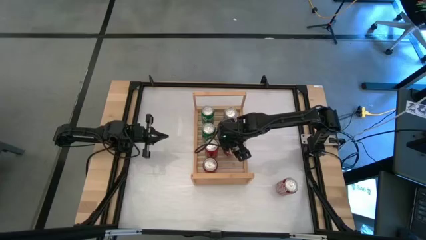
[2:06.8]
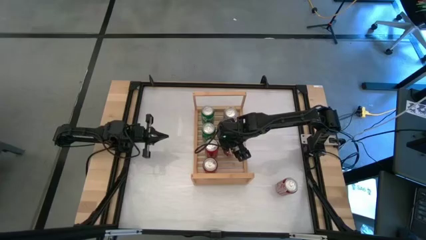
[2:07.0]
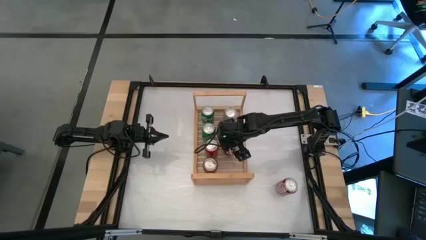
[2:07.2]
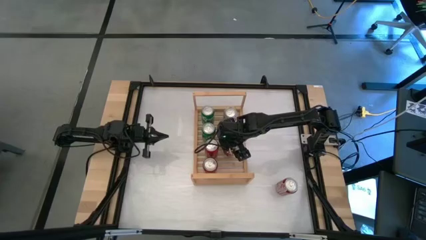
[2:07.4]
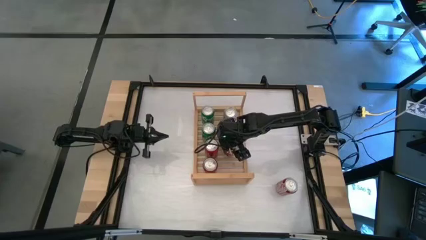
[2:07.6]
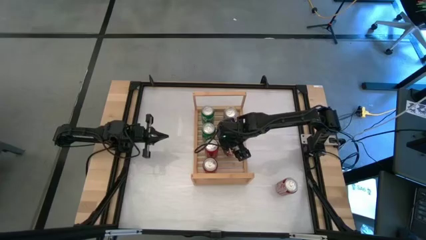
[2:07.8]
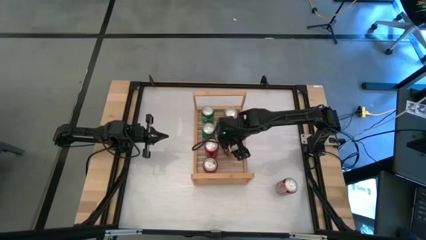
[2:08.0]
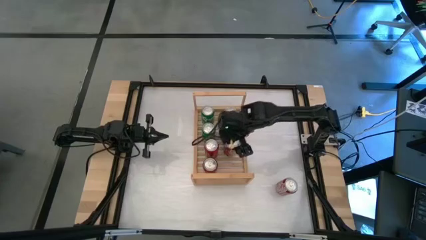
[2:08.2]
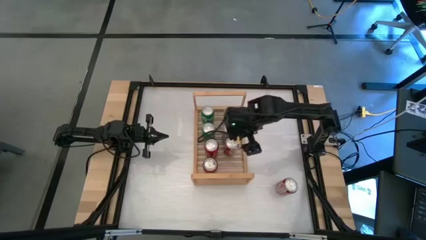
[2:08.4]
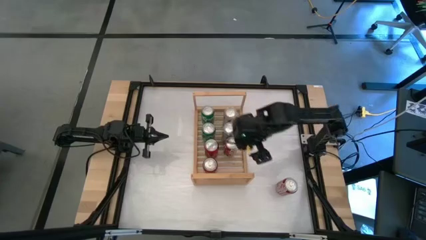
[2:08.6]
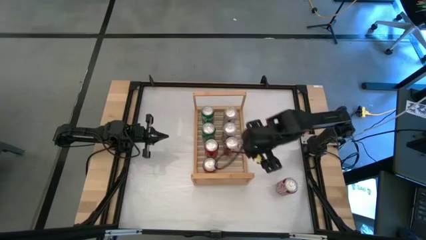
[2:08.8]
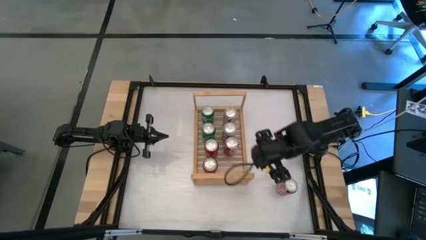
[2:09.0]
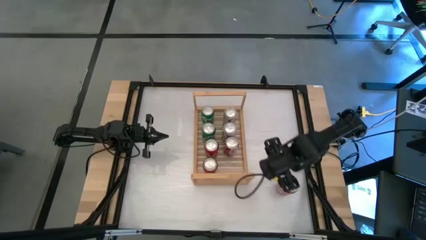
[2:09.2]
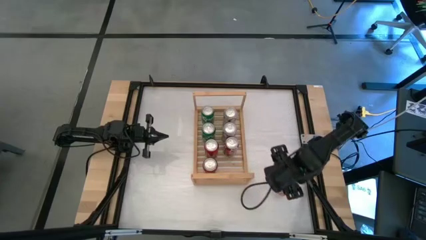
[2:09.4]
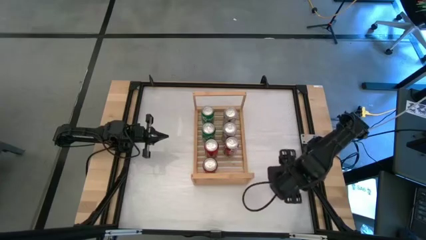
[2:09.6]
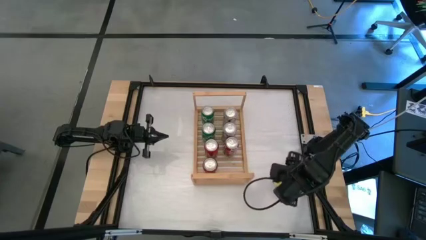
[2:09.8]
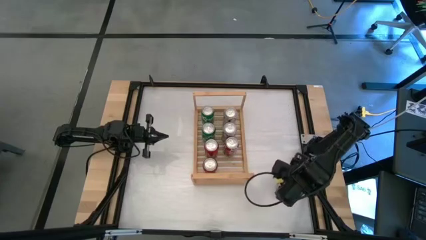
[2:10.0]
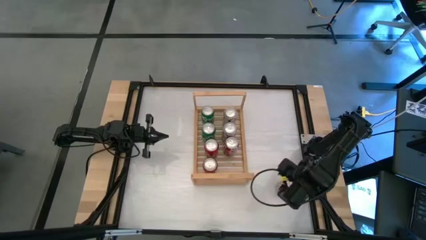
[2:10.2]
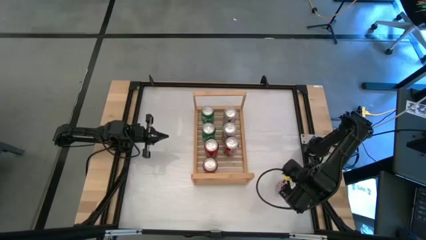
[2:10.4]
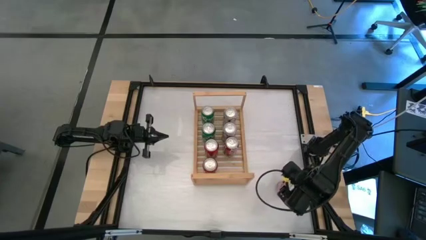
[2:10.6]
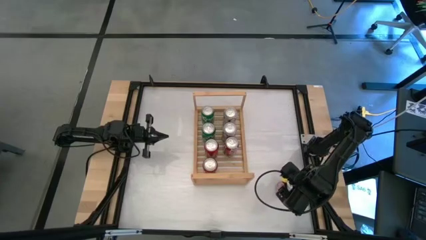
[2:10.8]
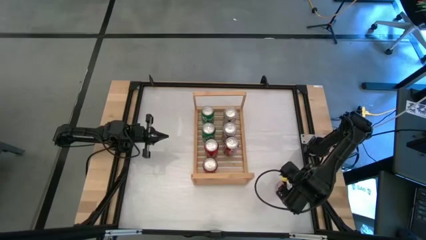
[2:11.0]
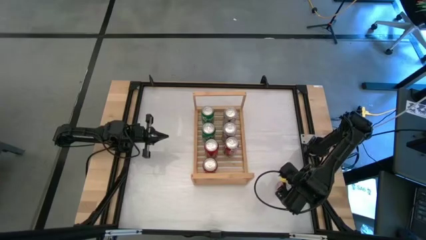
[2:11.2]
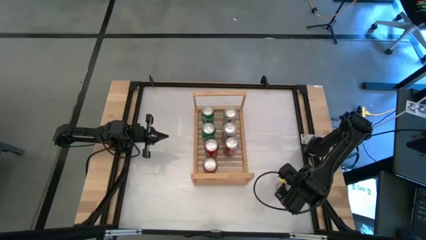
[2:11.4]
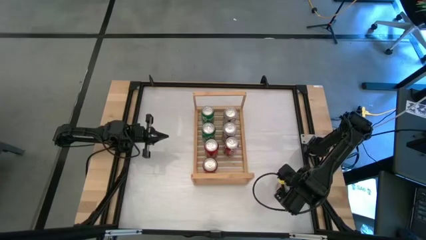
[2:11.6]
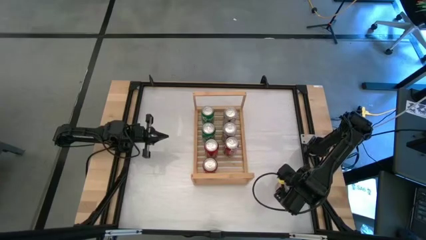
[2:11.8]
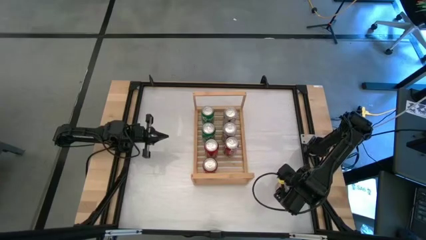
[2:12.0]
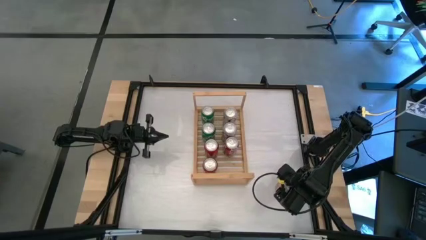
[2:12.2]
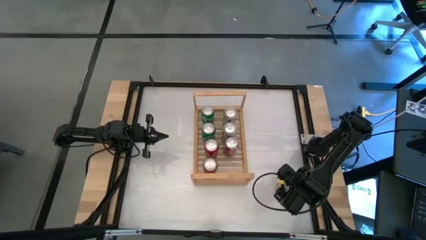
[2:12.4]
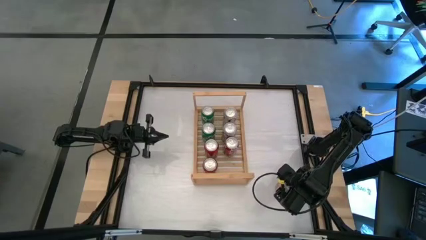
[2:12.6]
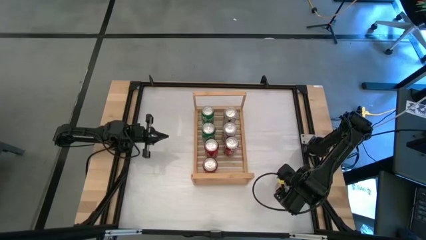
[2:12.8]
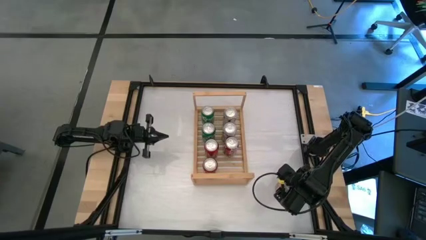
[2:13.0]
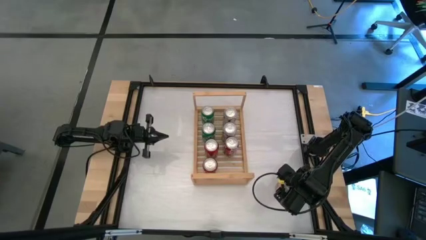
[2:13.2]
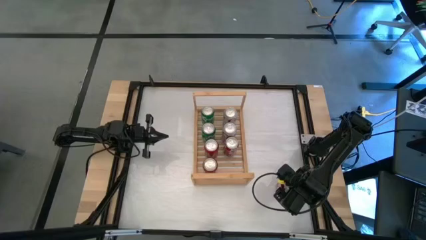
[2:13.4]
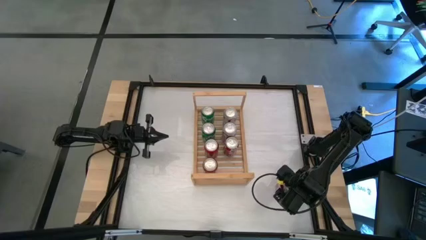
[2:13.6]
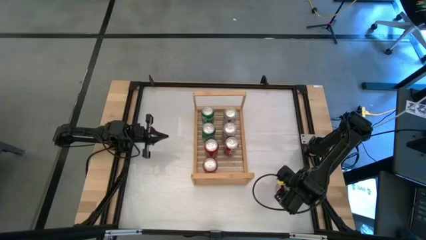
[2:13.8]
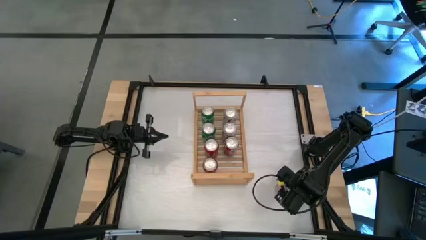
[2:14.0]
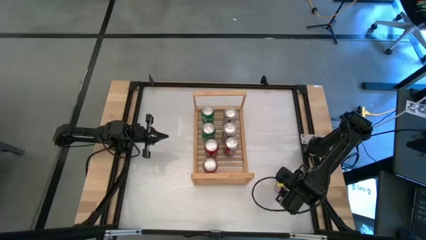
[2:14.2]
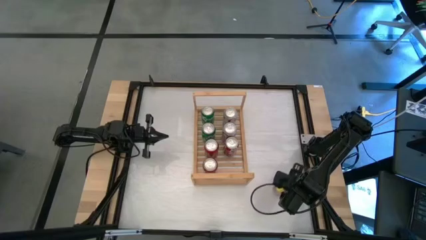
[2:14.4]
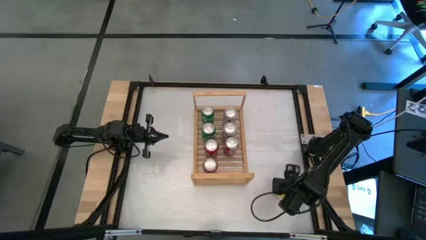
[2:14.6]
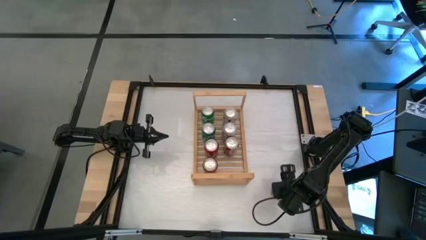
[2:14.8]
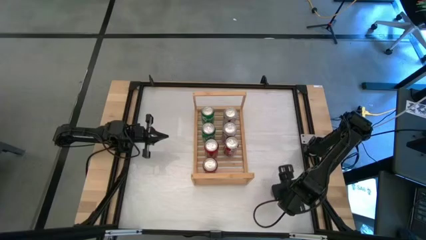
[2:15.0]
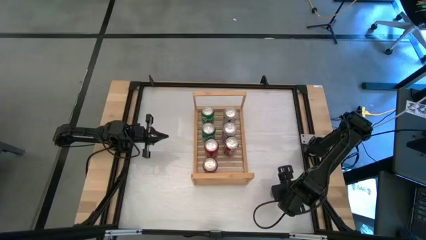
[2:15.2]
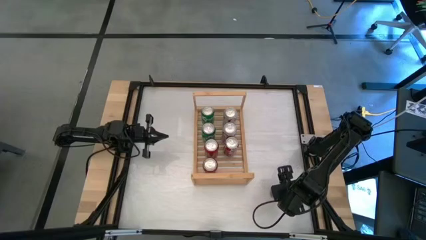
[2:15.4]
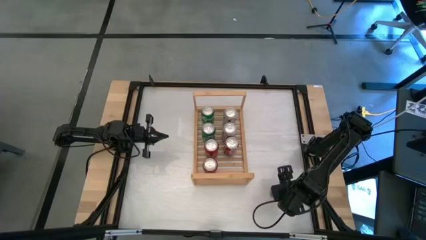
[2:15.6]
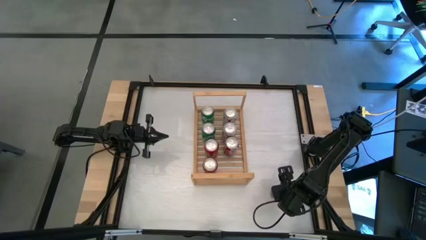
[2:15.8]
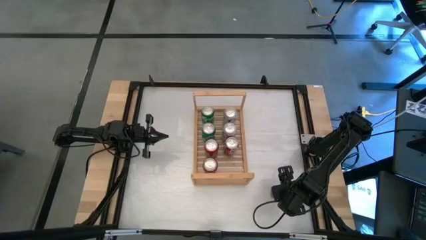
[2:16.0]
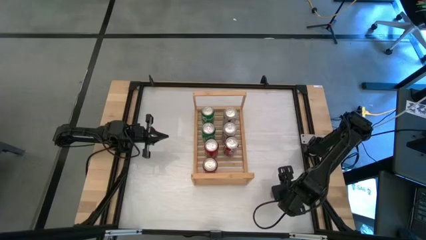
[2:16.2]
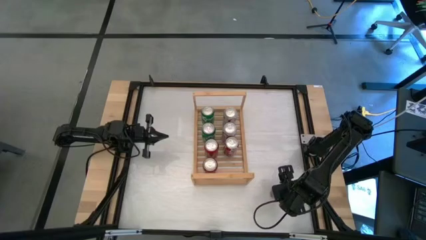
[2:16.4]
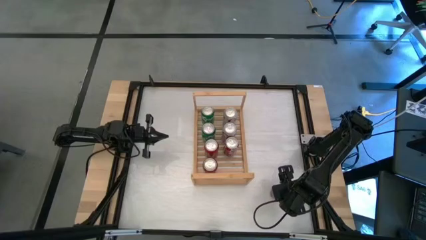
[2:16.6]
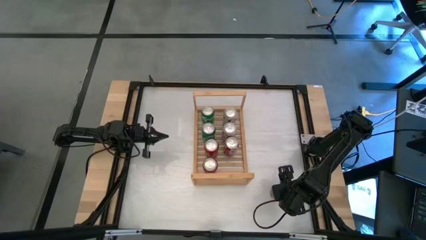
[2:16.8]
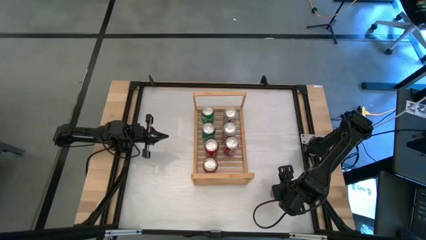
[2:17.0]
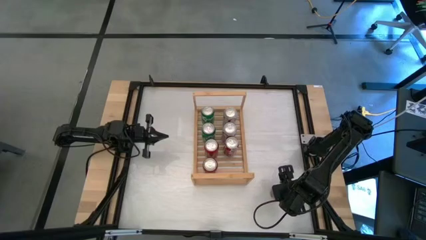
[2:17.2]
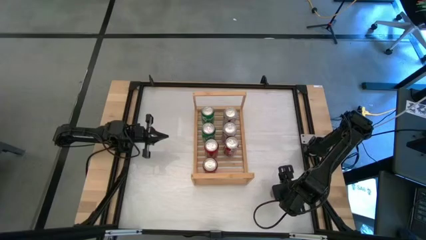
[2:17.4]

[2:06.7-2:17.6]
Task: Place canned beverage on shelf
Put the red soda on the shelf

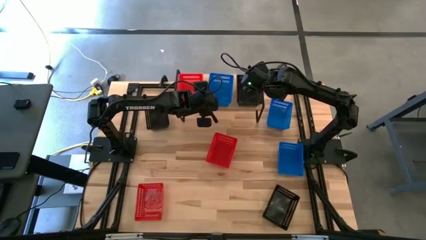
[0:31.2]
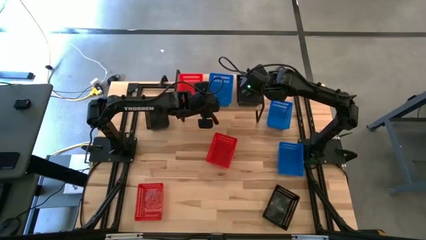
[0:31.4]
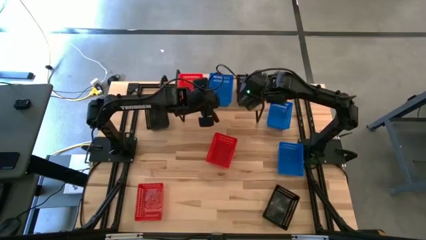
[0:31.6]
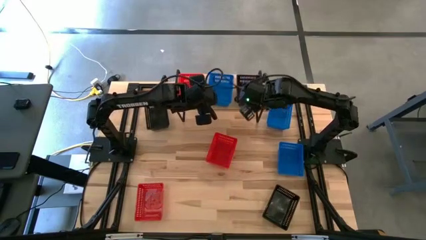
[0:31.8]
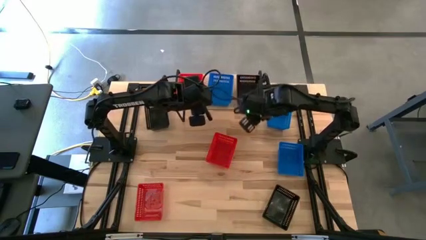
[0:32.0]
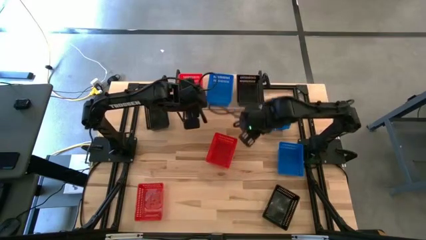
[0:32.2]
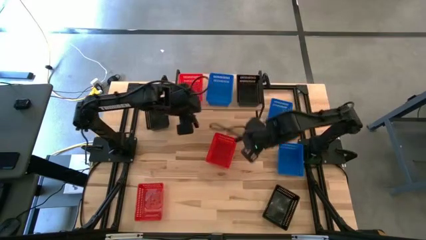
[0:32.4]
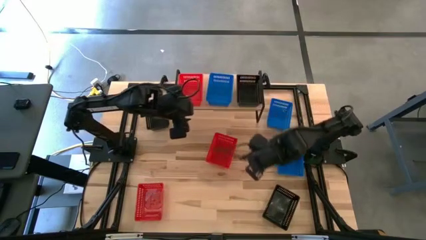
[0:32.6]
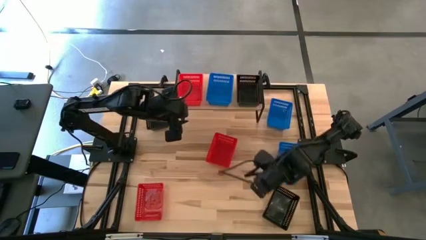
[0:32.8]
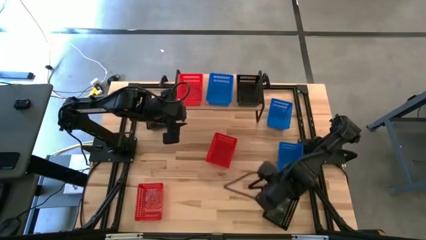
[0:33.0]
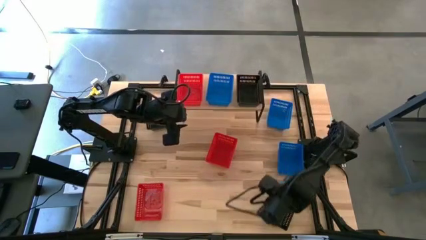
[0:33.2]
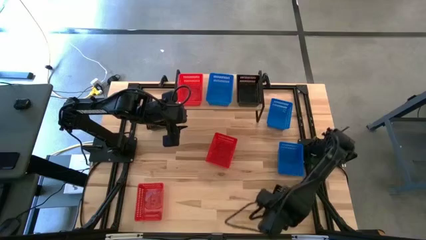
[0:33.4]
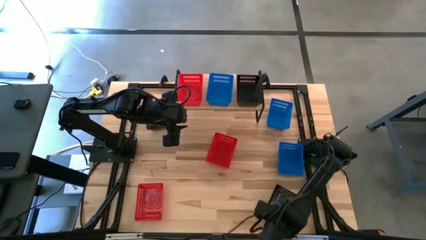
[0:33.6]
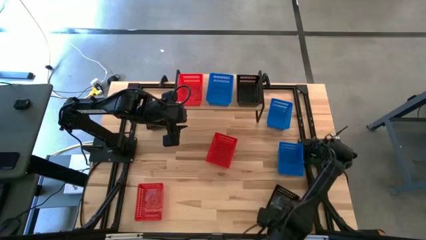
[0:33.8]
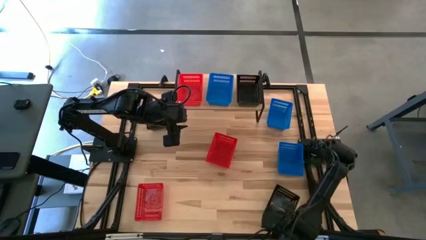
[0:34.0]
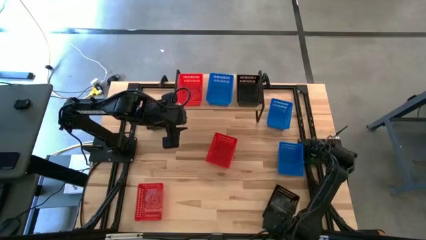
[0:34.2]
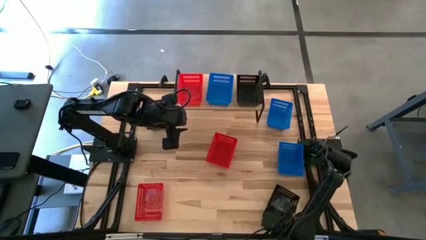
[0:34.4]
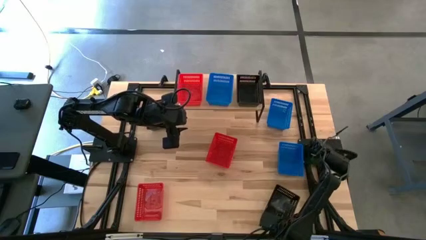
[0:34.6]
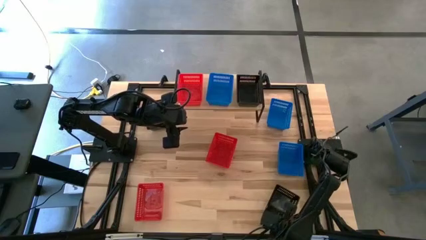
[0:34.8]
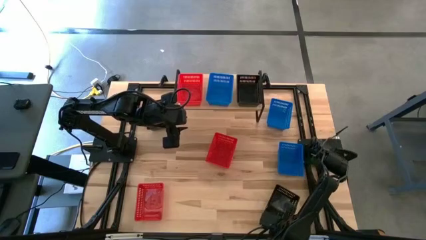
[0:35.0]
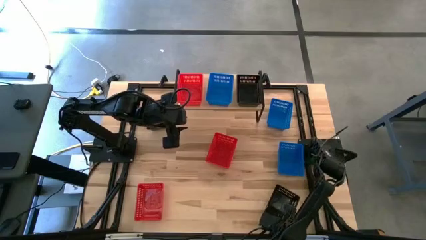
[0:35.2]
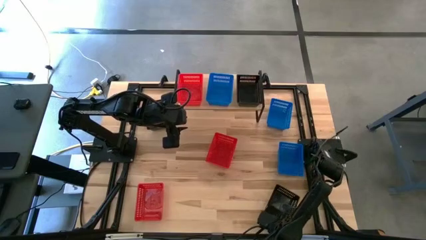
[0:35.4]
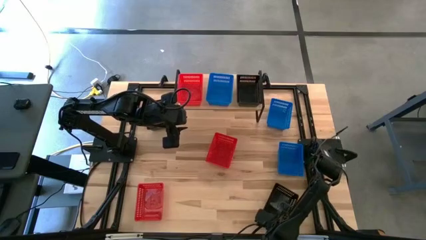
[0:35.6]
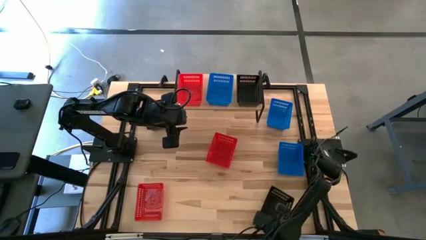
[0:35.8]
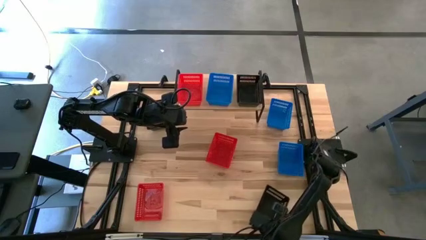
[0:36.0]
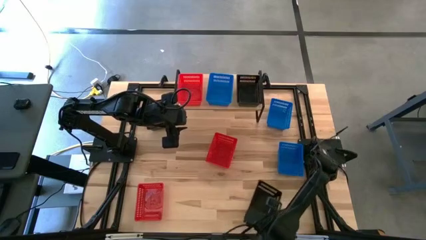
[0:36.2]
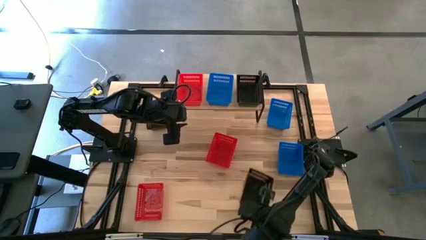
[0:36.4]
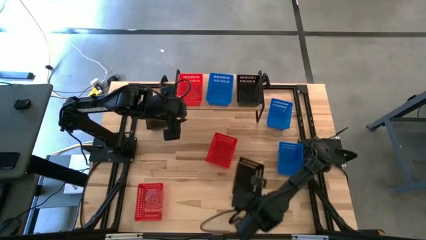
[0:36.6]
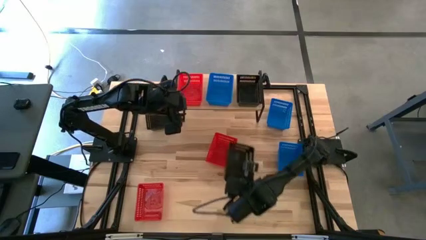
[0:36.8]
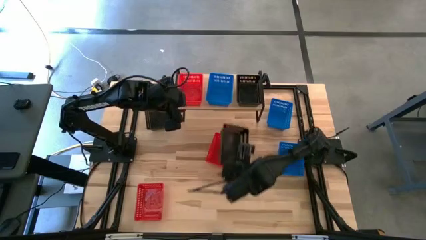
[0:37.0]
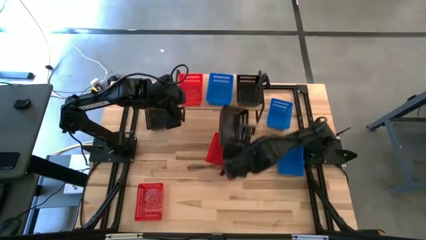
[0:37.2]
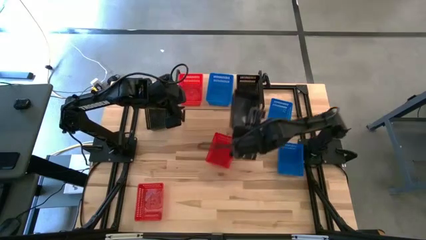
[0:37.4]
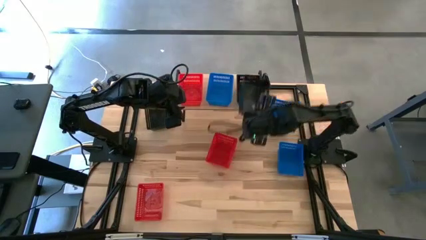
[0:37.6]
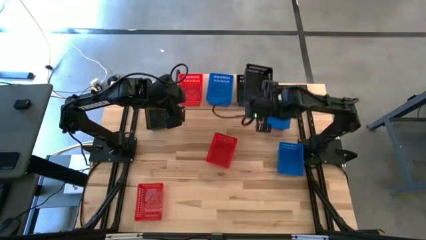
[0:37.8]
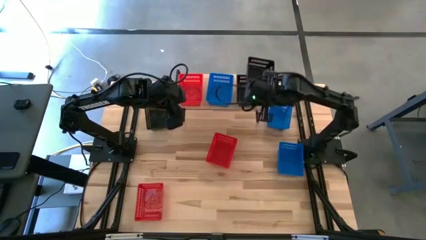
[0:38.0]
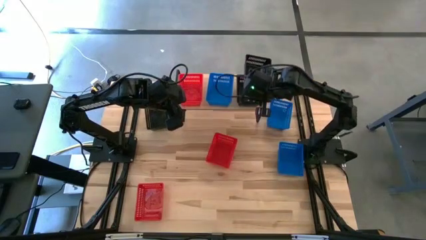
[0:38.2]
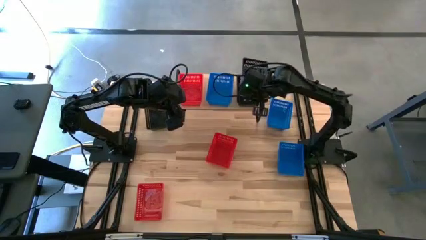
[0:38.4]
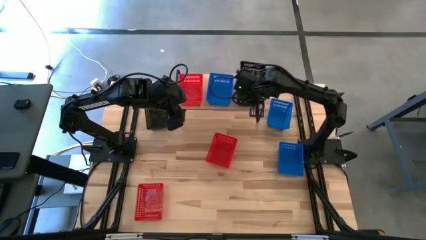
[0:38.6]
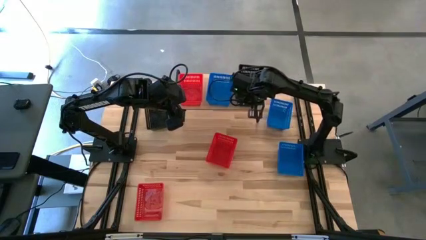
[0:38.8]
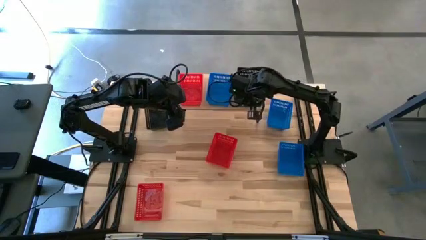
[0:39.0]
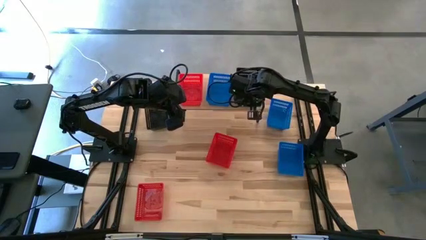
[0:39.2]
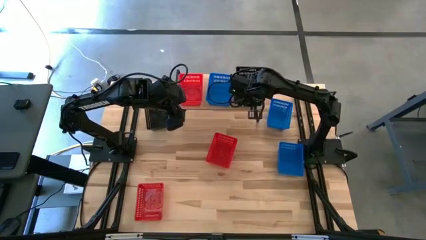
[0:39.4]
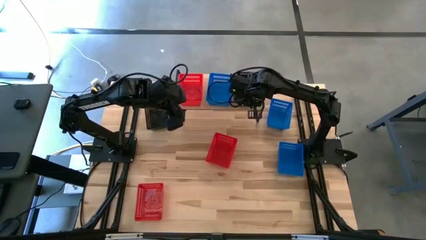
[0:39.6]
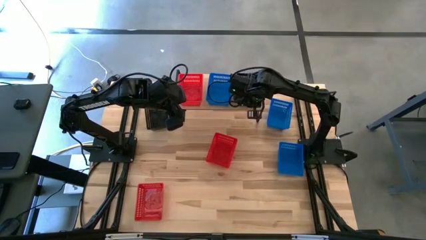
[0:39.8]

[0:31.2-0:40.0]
Task: Stack baskets on shelf by color
Stack the bottom black basket on top of the black basket on the shelf
